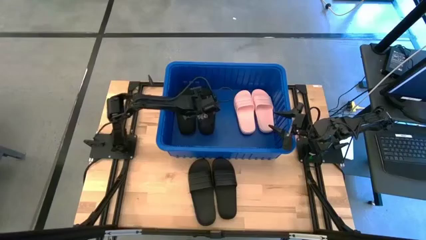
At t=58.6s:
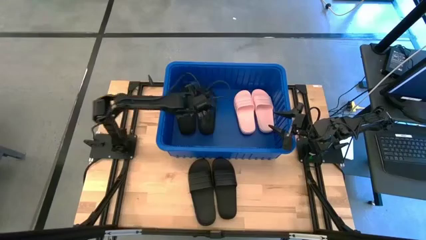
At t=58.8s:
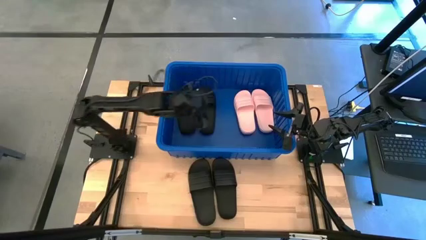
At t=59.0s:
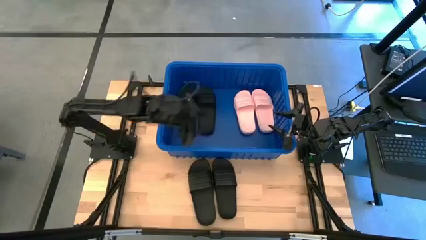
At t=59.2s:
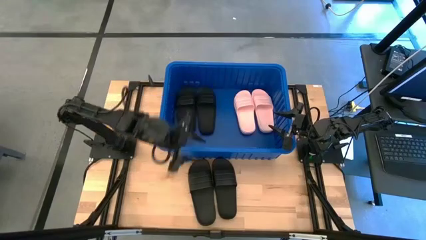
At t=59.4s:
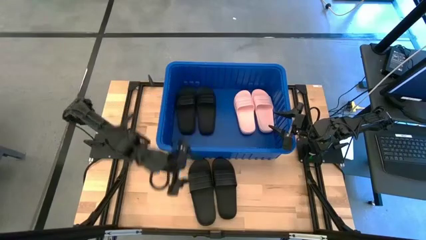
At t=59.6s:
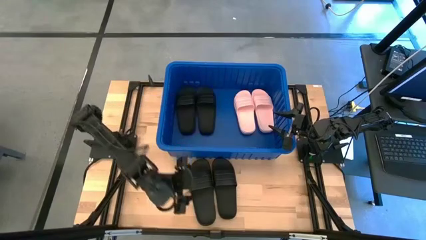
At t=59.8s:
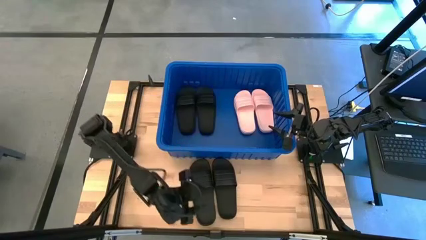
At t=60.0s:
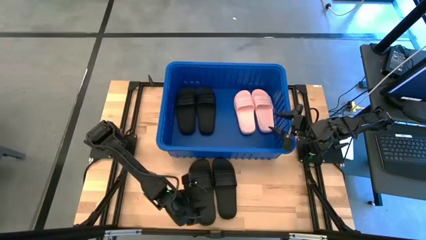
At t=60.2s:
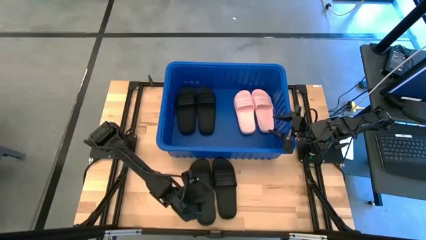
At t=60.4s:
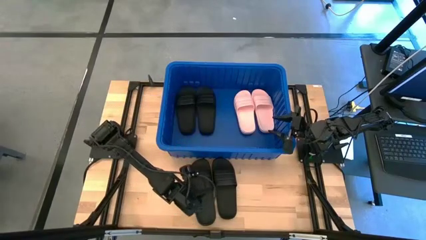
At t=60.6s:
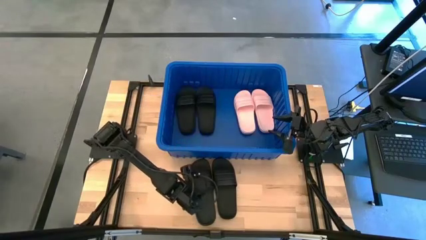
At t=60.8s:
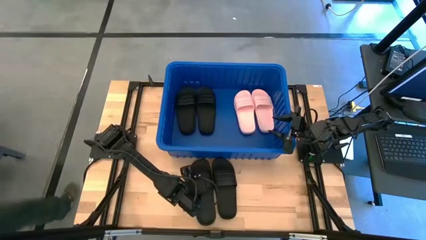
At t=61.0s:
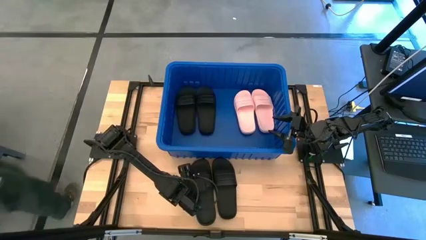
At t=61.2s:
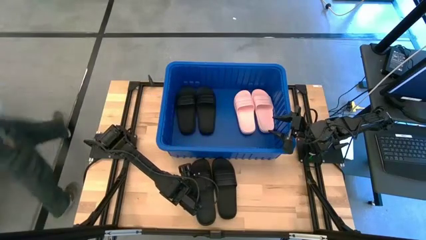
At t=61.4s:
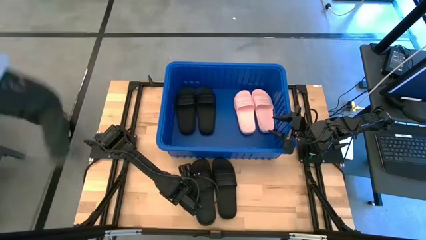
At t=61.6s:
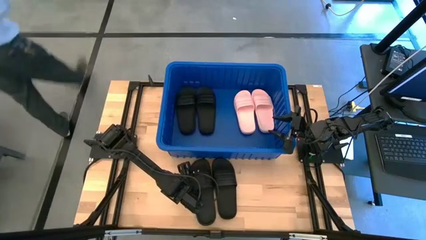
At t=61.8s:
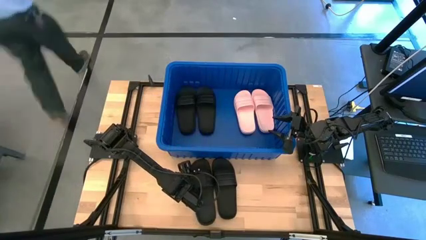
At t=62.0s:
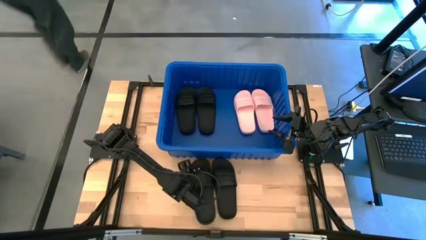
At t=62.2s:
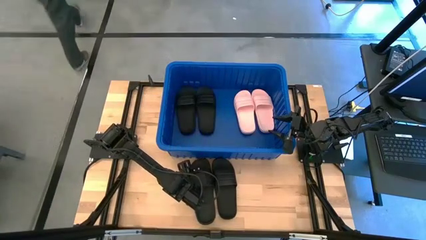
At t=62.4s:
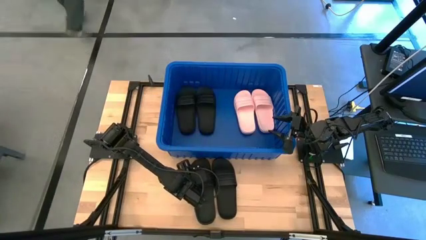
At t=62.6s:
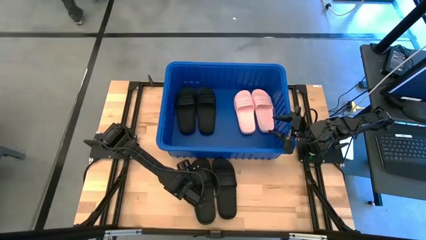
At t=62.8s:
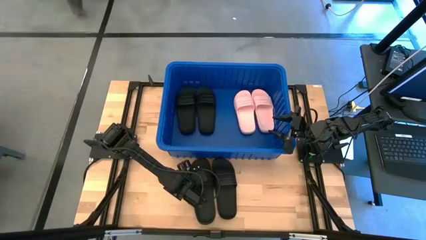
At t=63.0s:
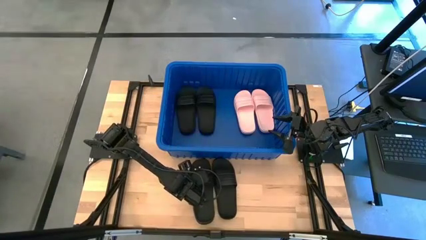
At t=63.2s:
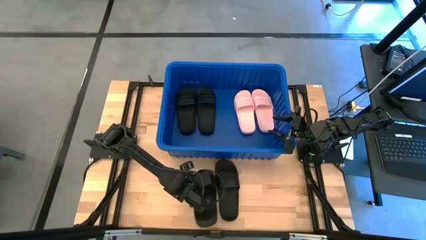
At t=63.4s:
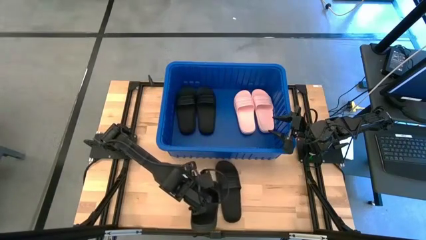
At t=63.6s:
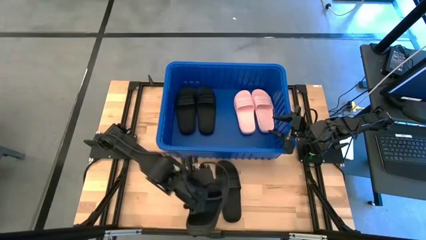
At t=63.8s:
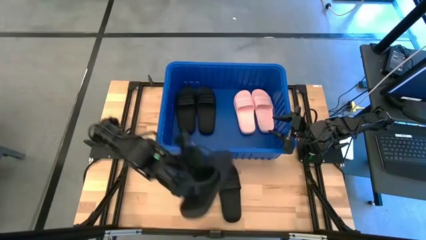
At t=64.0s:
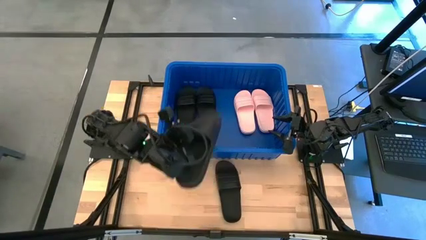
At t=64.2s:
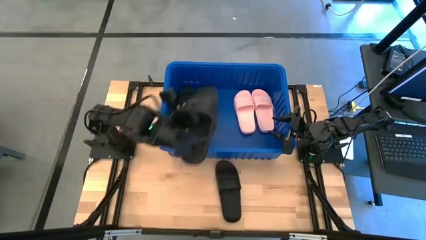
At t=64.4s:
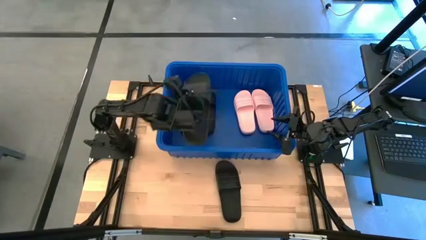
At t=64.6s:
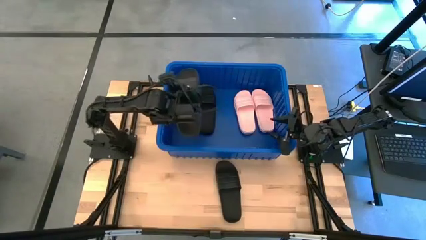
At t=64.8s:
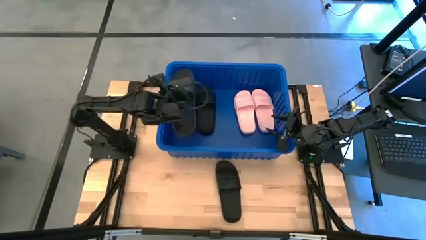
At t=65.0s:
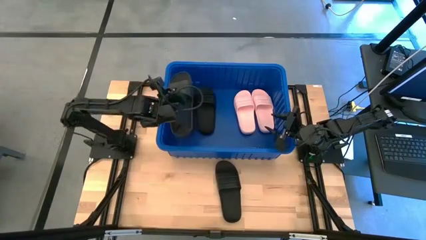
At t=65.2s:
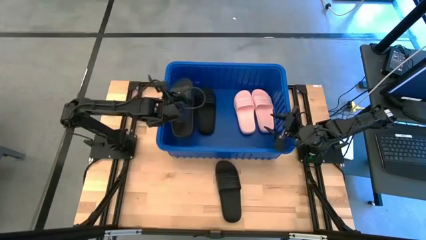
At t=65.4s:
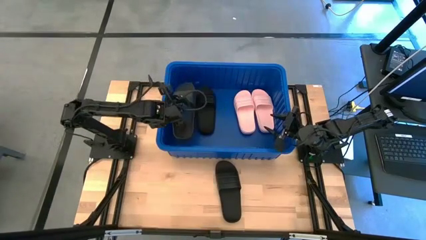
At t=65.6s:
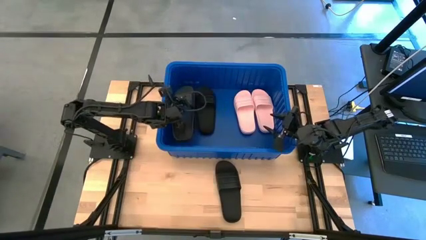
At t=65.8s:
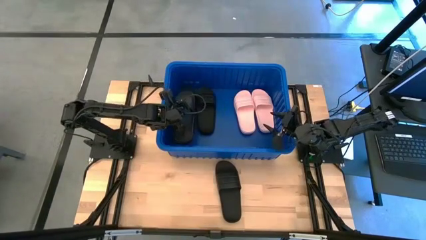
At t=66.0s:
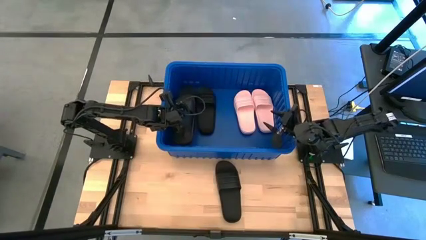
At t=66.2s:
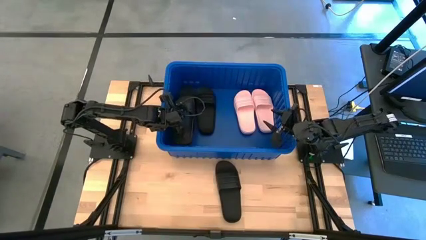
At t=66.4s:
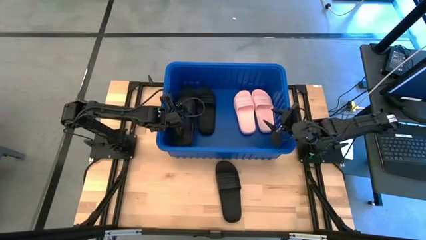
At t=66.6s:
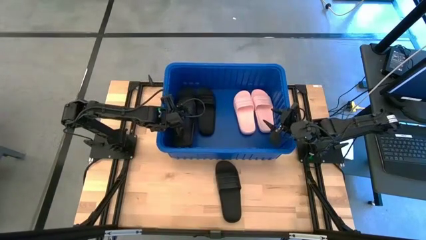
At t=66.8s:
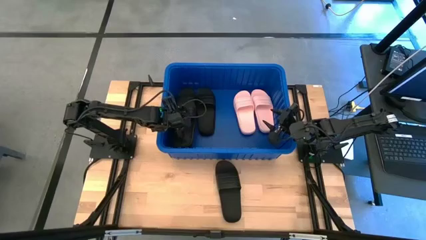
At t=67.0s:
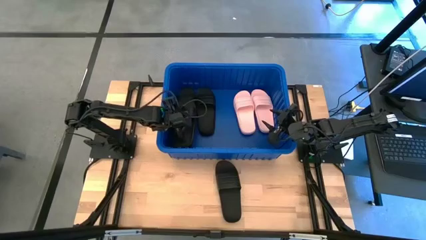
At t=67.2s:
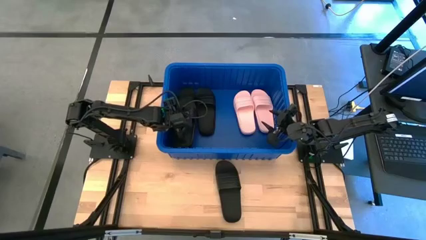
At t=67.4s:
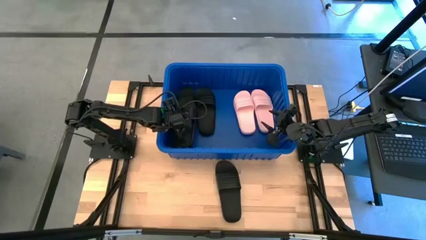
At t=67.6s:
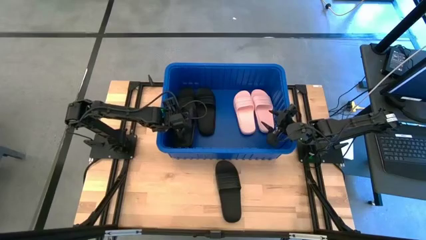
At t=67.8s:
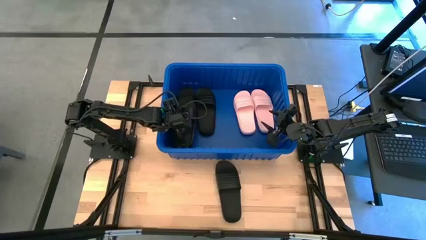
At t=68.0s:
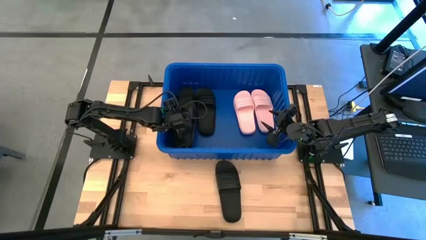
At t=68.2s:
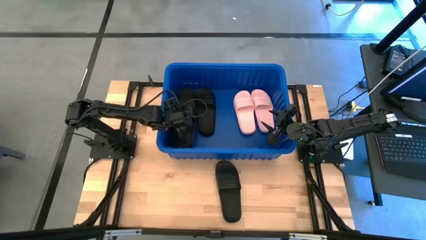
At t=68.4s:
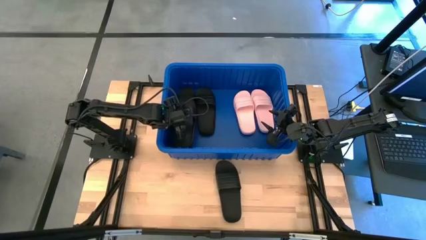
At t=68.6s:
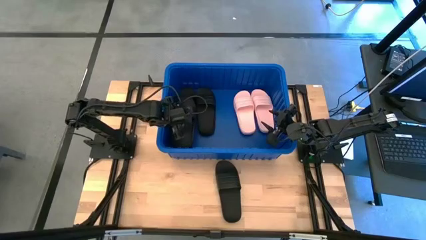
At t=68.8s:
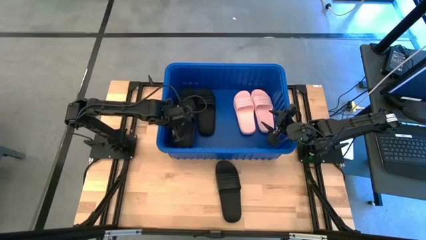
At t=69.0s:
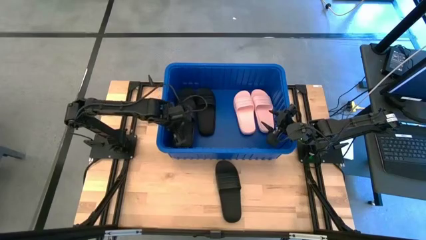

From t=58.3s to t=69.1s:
Task: Pick and place slides into bin
Put the black slipper into the blue bin
